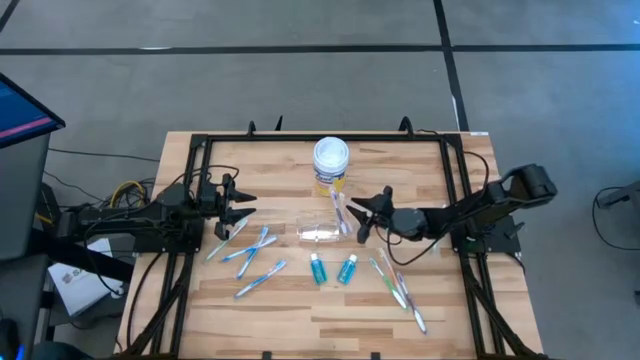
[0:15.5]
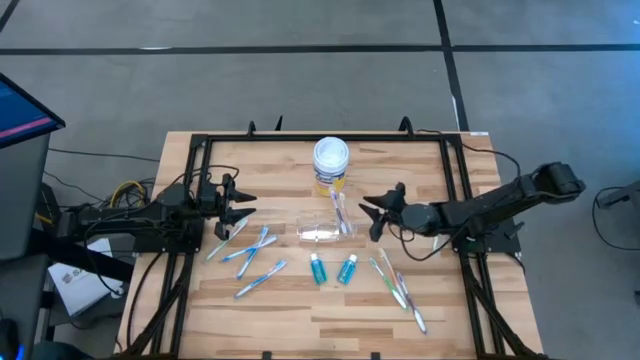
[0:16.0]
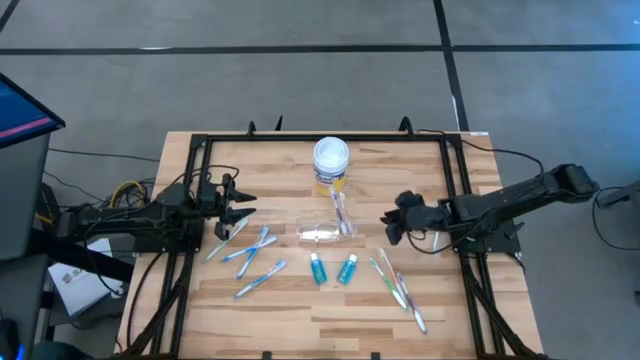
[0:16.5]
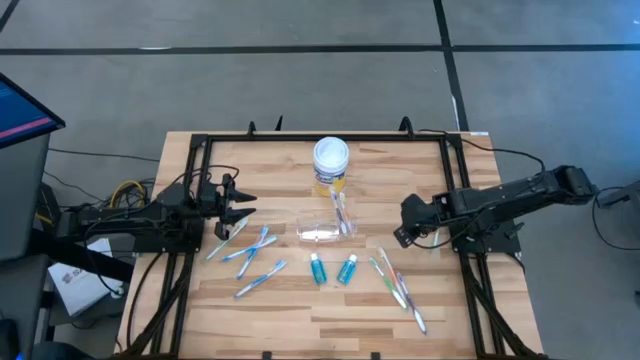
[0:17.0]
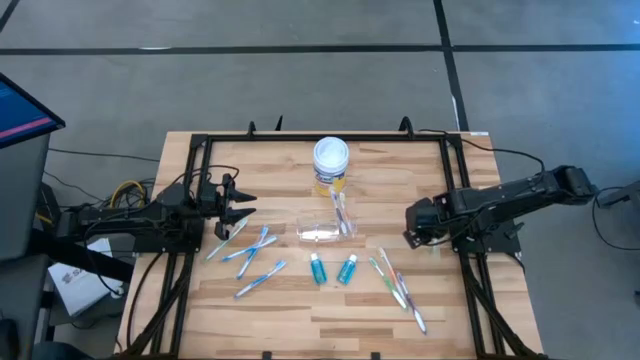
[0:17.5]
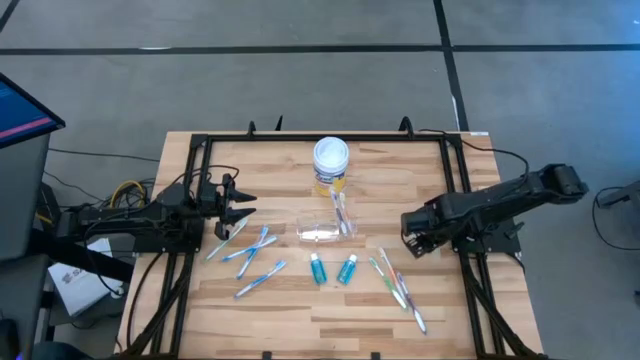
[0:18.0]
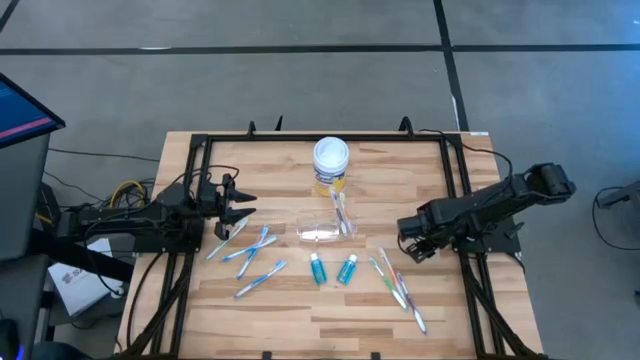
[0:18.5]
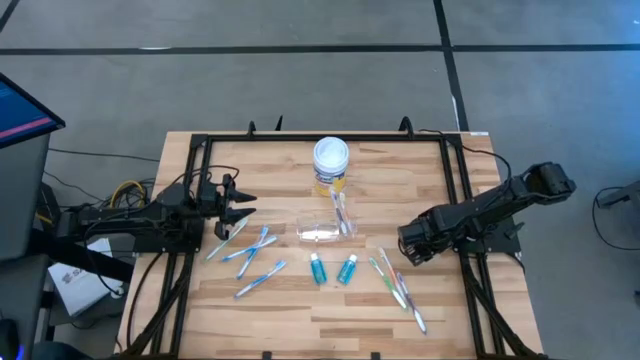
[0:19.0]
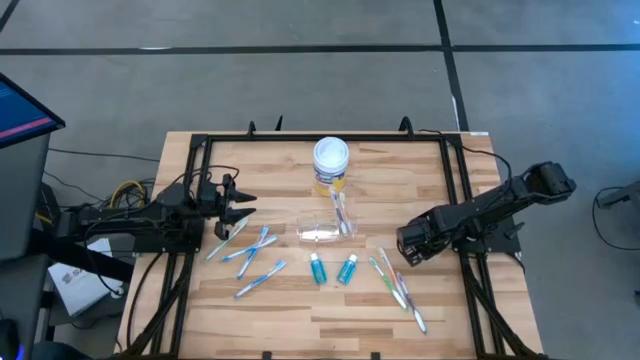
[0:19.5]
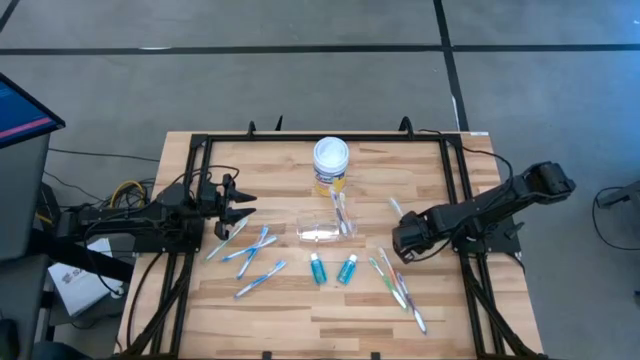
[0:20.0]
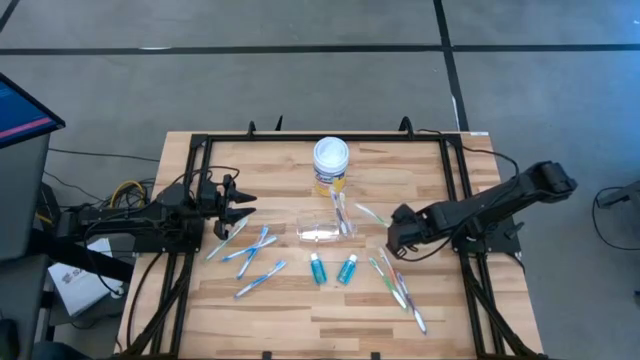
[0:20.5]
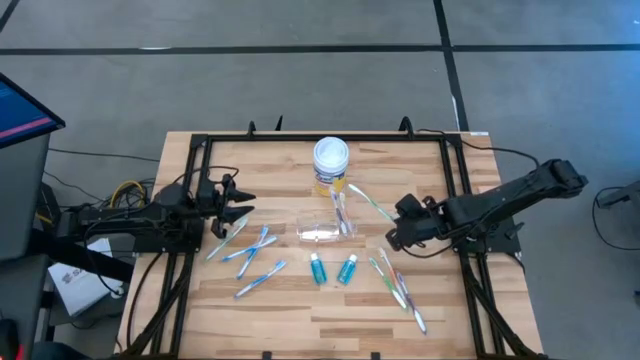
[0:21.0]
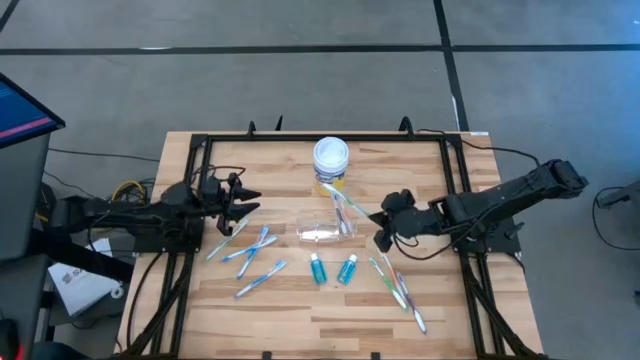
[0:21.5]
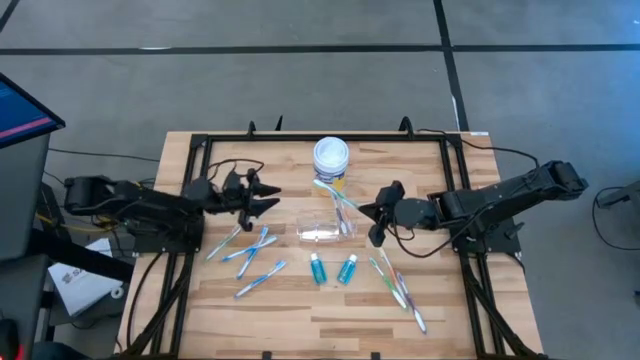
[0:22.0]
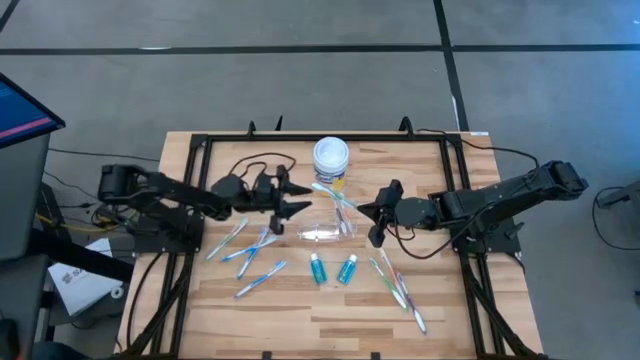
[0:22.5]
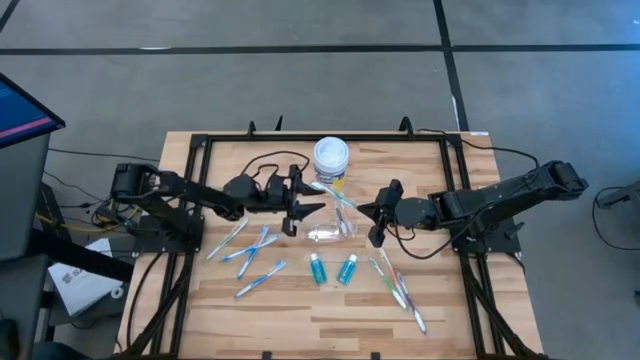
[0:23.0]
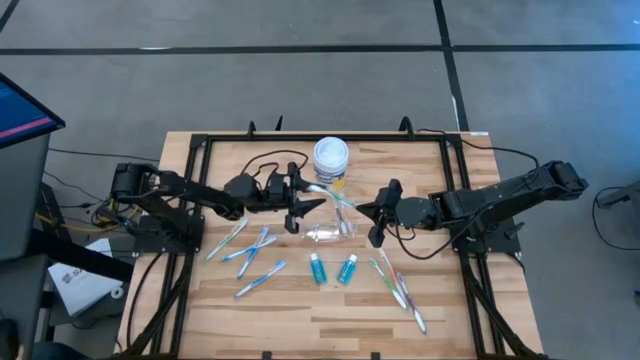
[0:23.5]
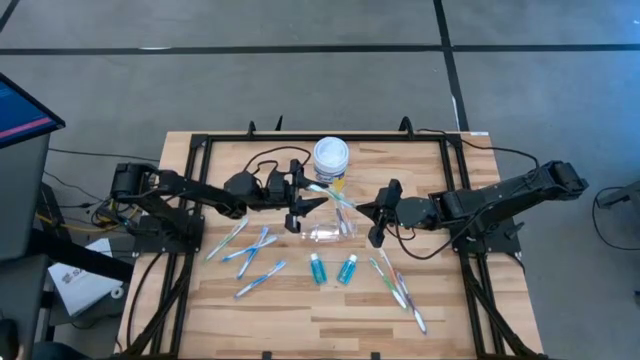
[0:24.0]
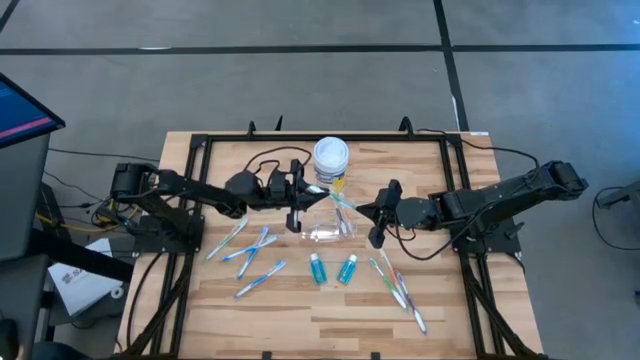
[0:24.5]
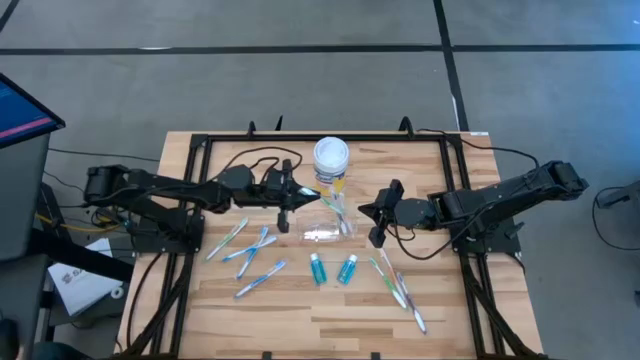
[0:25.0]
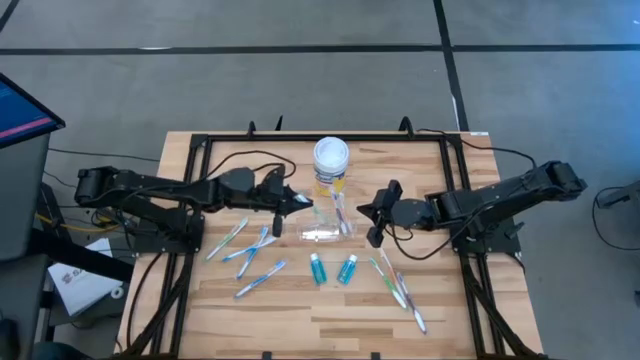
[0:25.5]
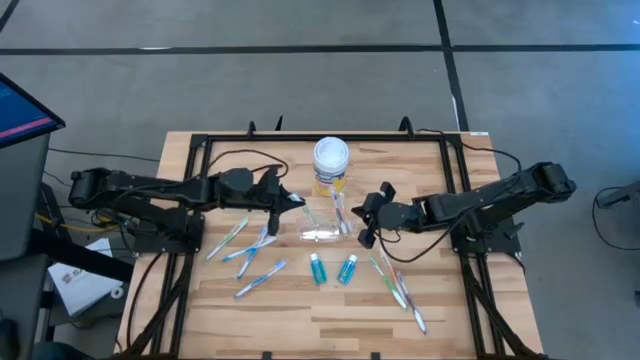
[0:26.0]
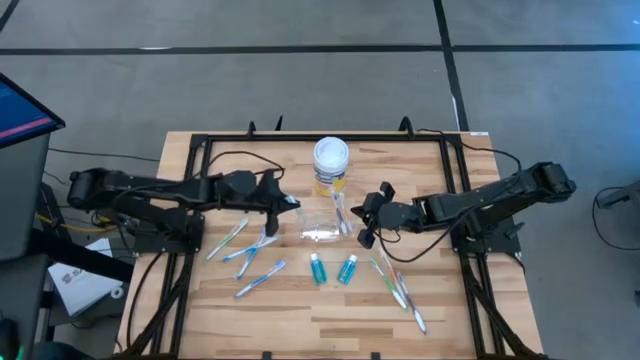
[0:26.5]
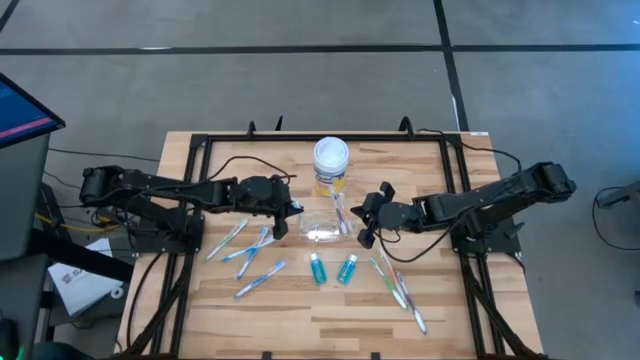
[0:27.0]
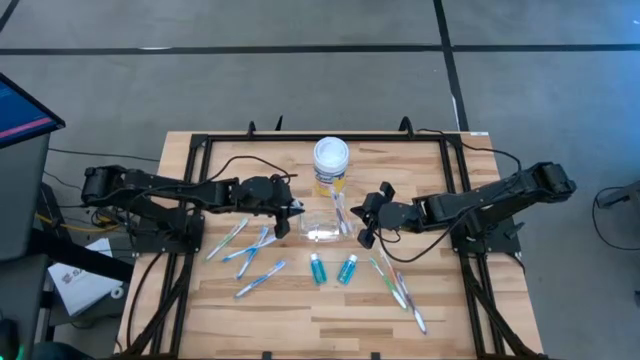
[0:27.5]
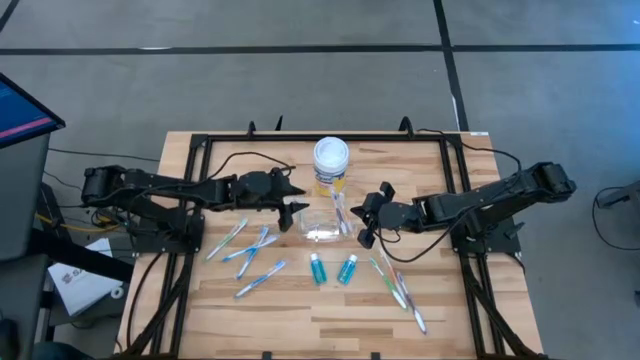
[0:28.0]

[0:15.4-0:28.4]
Task: Pick & Place toothbrushing station
Put the right green toothbrush into the transparent organizer

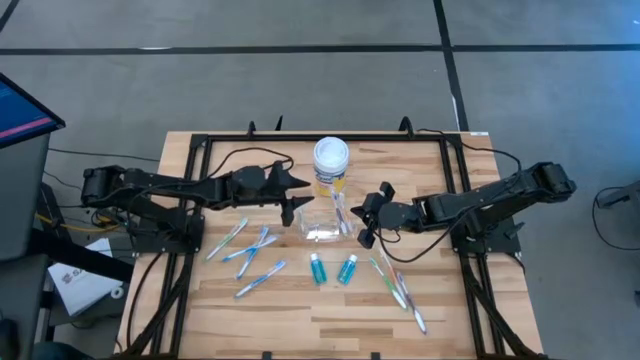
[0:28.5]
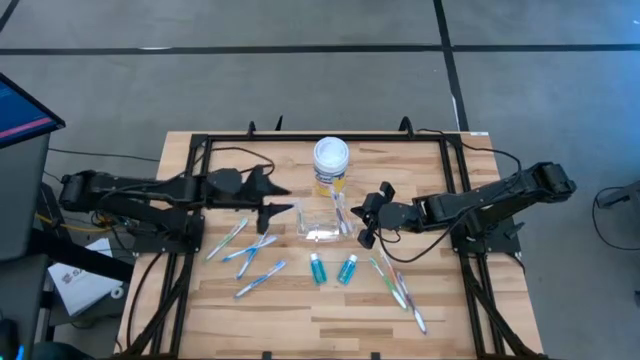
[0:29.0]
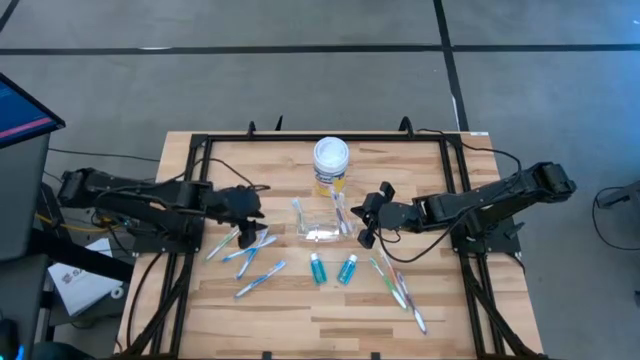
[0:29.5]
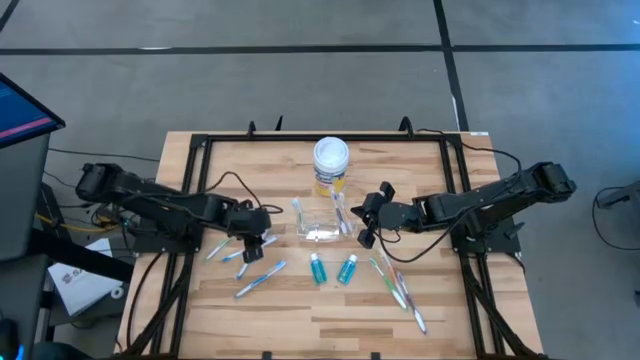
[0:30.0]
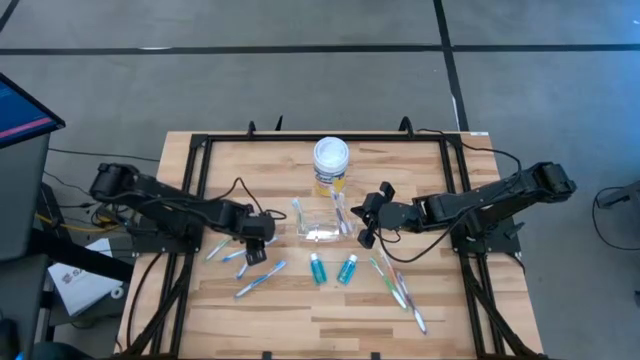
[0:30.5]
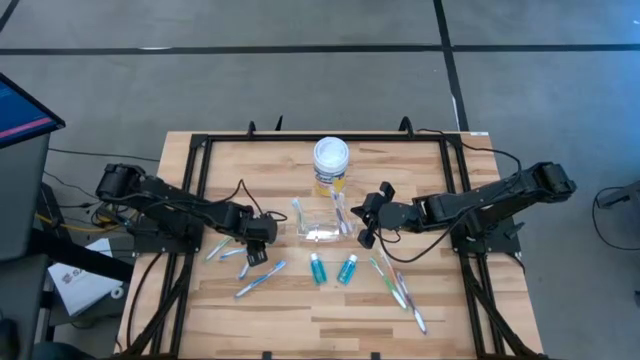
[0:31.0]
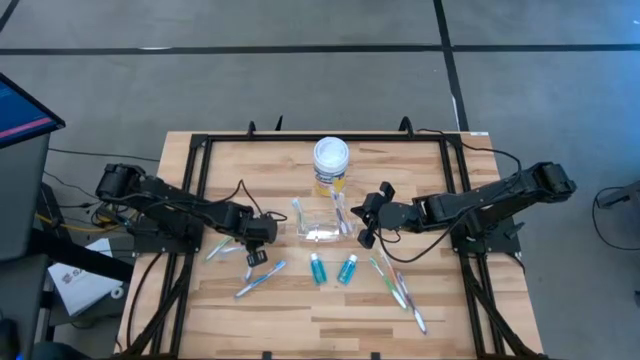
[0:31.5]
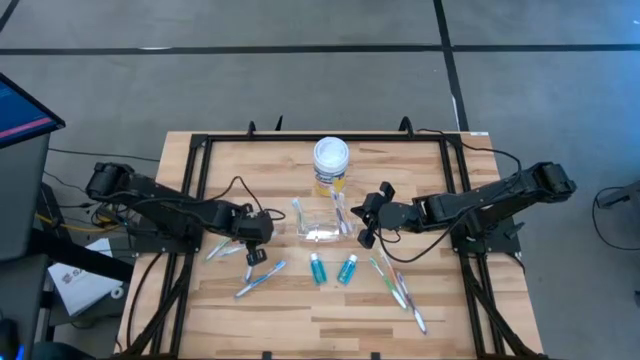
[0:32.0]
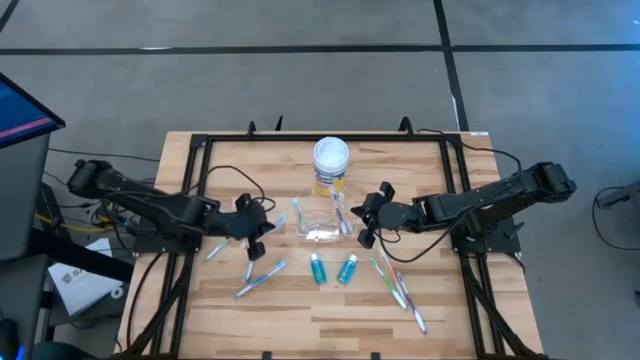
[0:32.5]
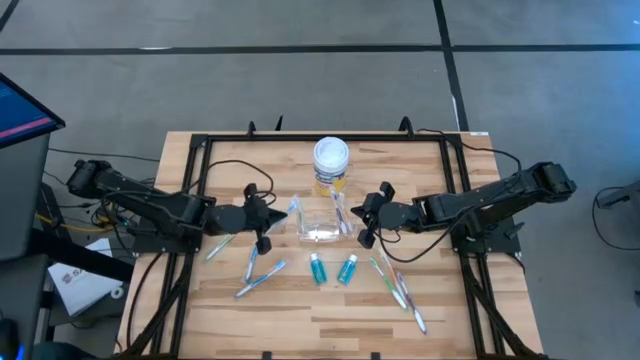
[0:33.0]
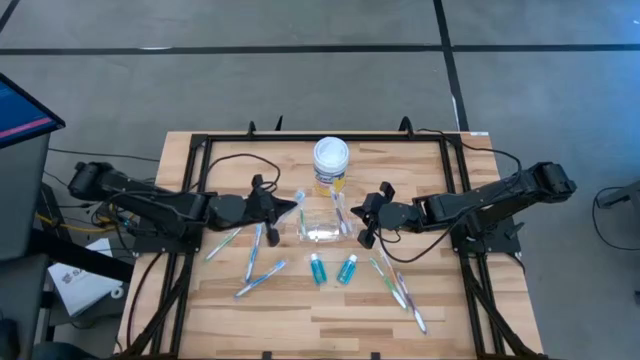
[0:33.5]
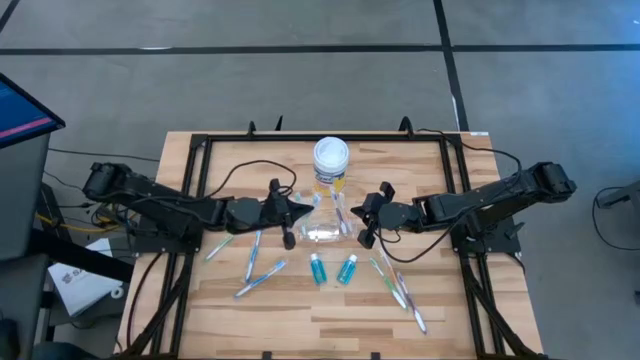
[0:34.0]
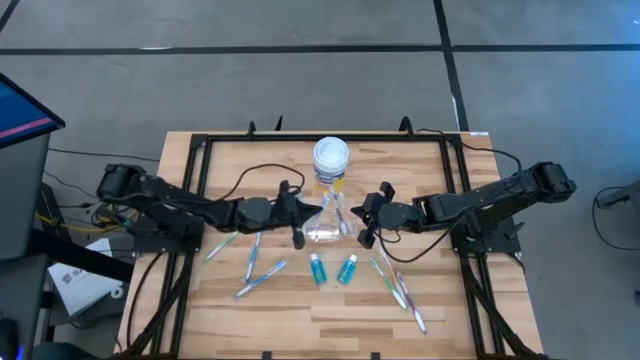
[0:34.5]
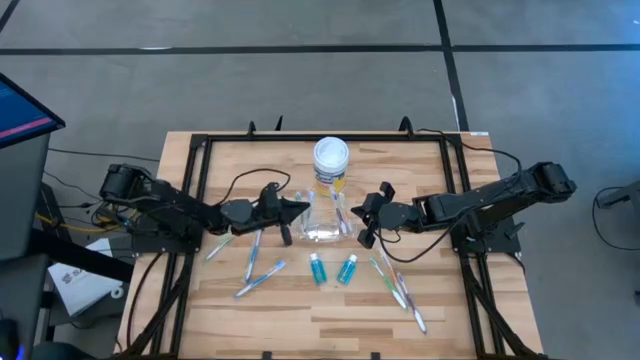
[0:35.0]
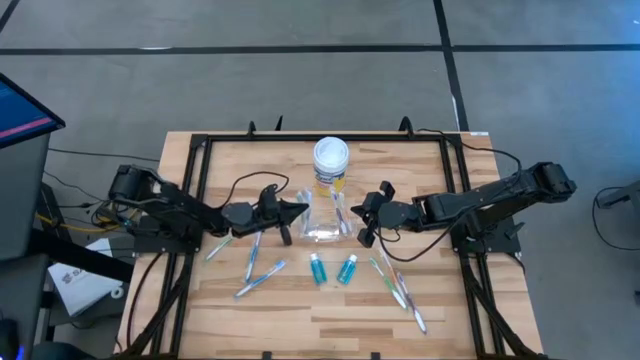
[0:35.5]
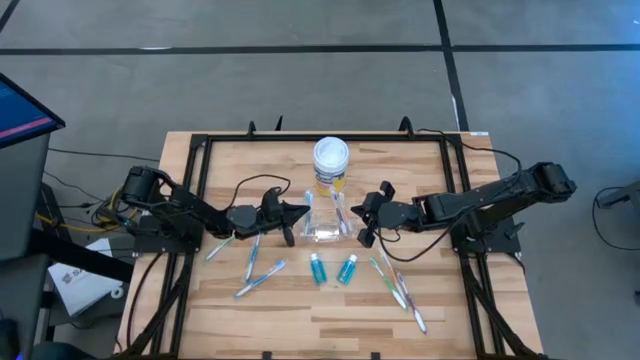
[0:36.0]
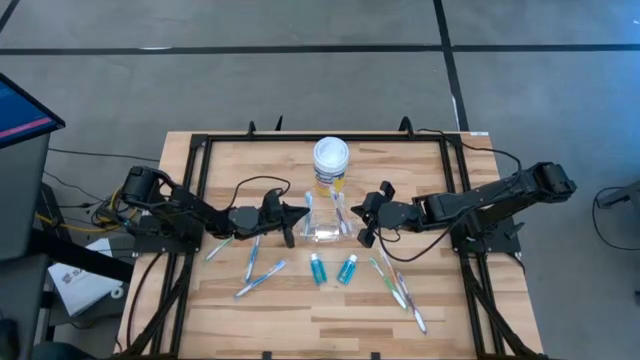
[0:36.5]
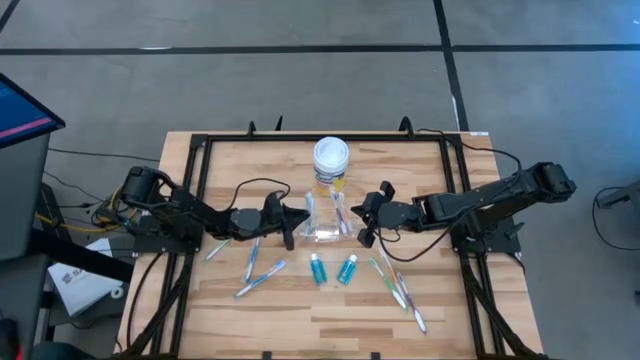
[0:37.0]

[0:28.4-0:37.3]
Put the left blue toothbrush into the transparent organizer
